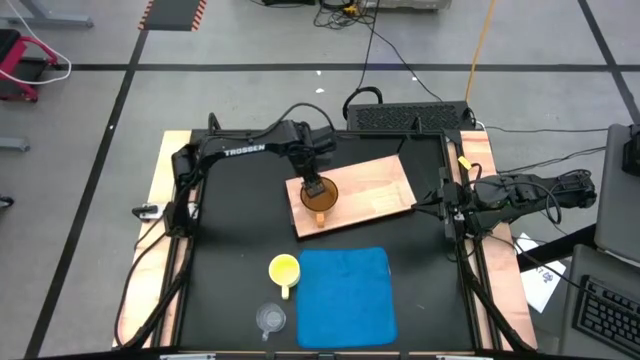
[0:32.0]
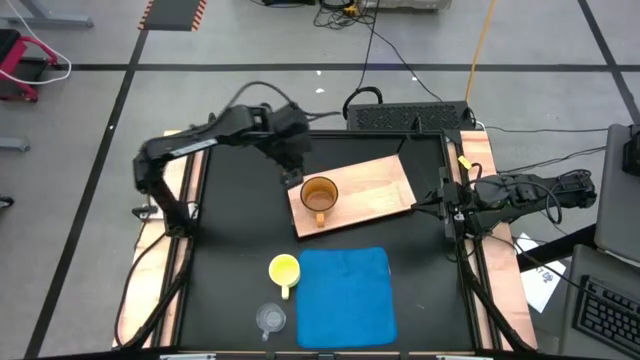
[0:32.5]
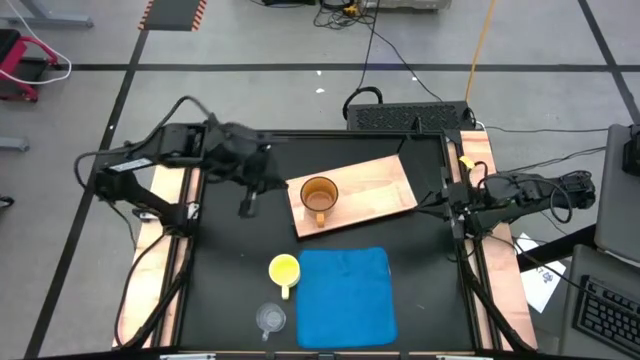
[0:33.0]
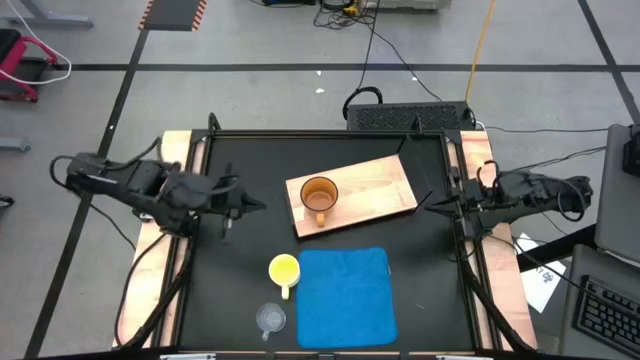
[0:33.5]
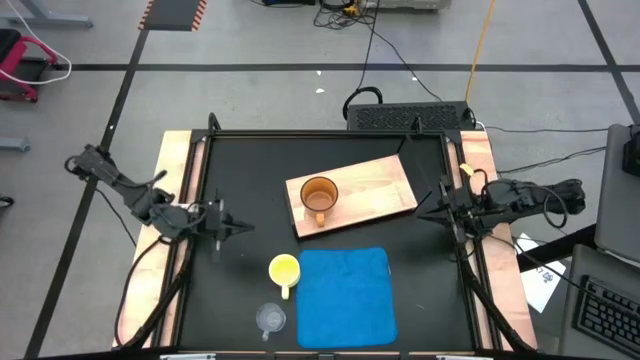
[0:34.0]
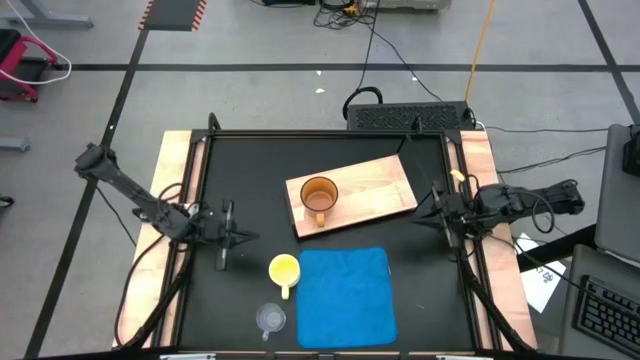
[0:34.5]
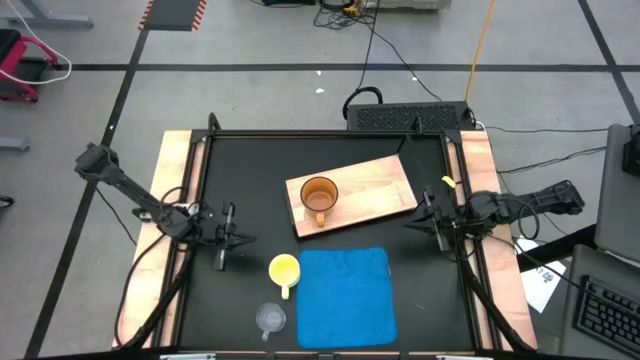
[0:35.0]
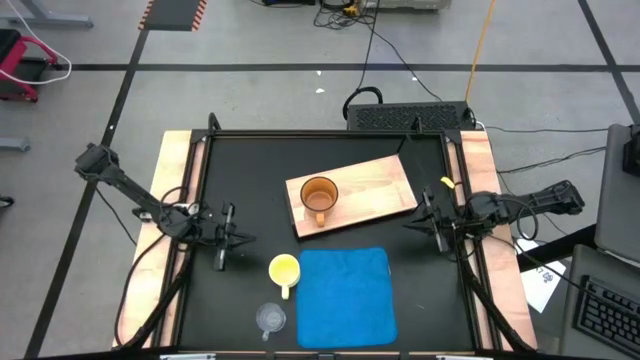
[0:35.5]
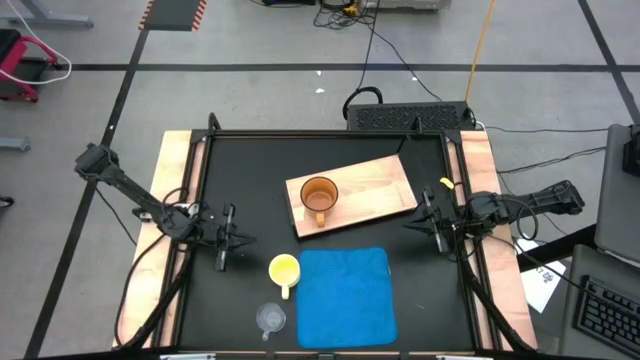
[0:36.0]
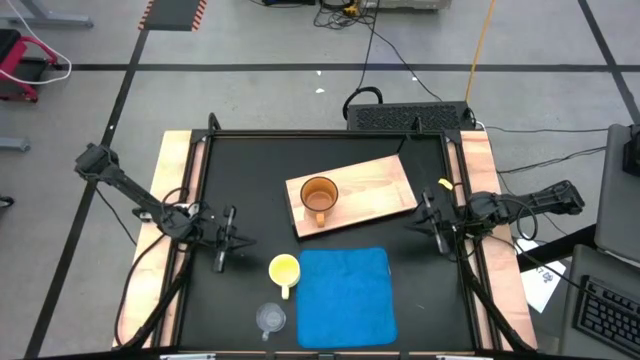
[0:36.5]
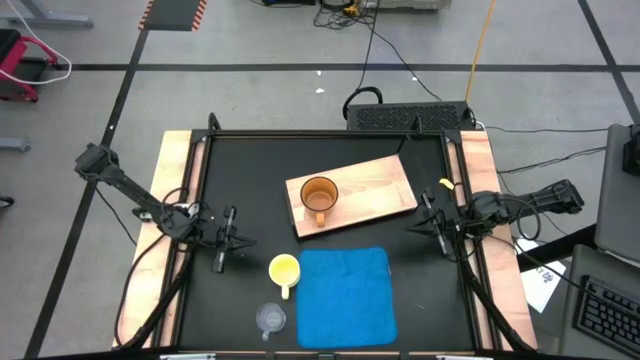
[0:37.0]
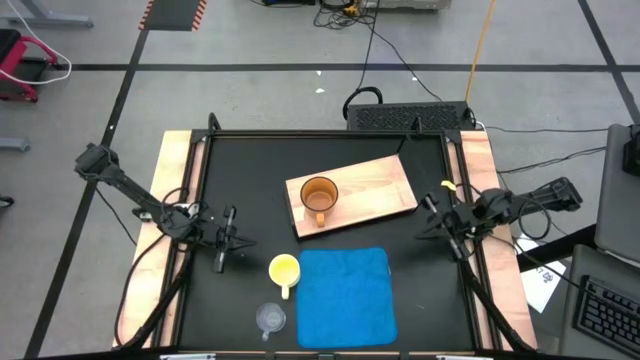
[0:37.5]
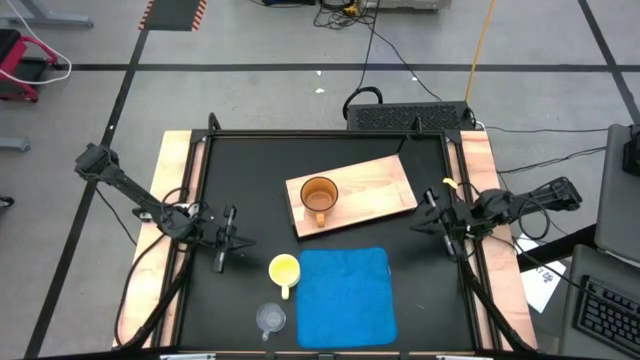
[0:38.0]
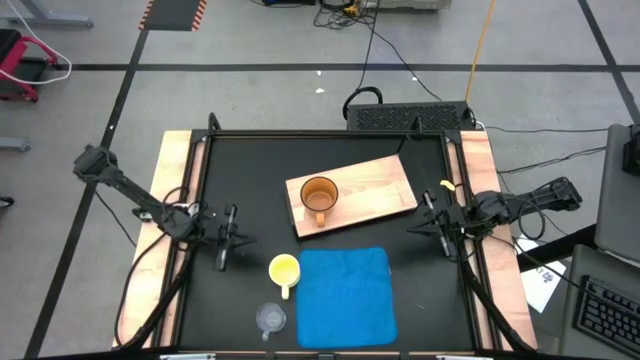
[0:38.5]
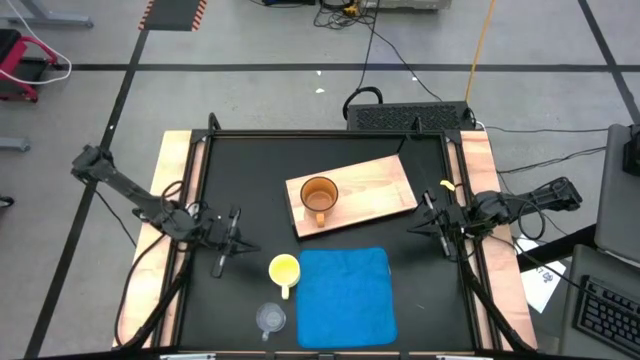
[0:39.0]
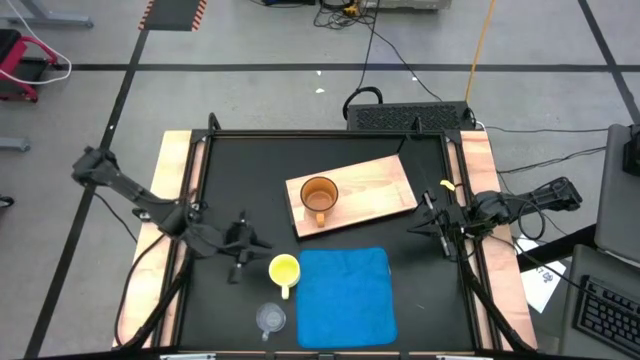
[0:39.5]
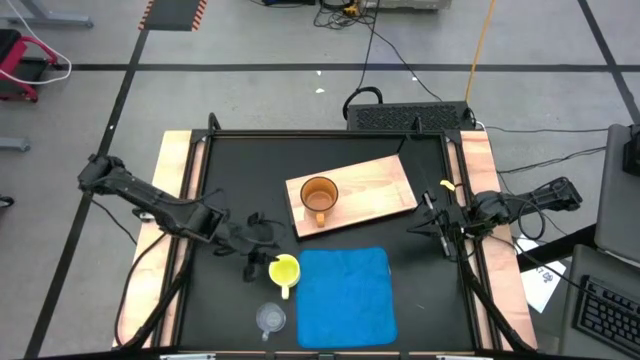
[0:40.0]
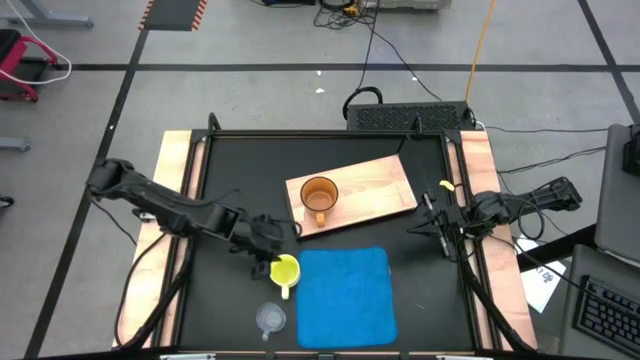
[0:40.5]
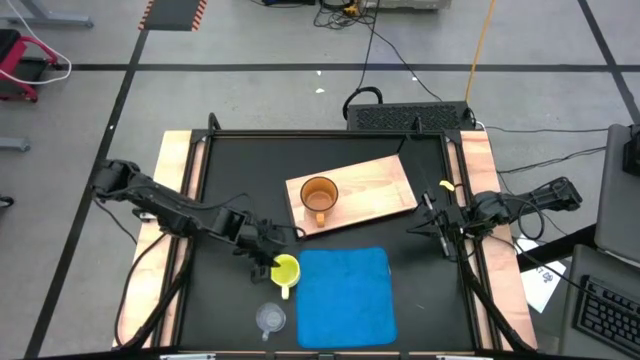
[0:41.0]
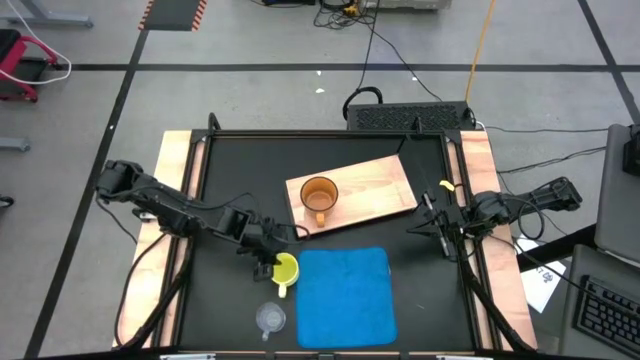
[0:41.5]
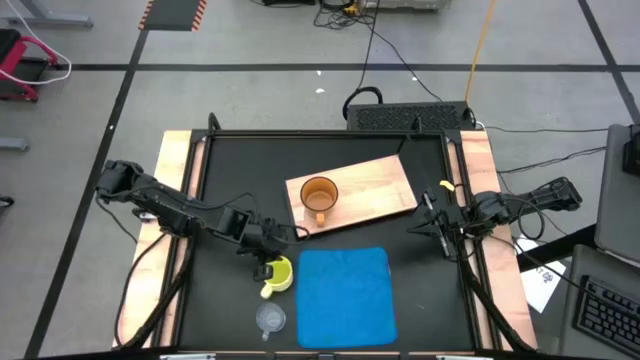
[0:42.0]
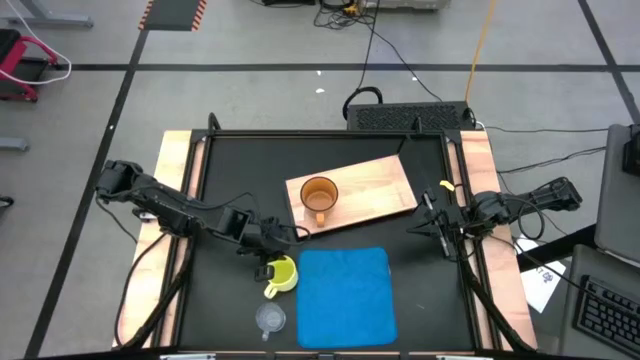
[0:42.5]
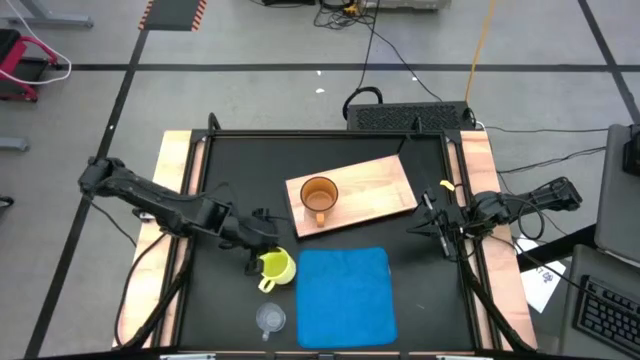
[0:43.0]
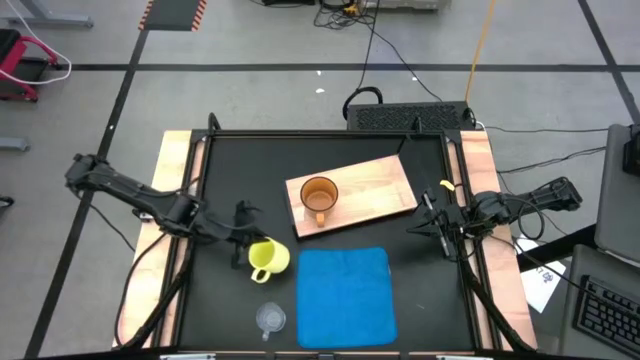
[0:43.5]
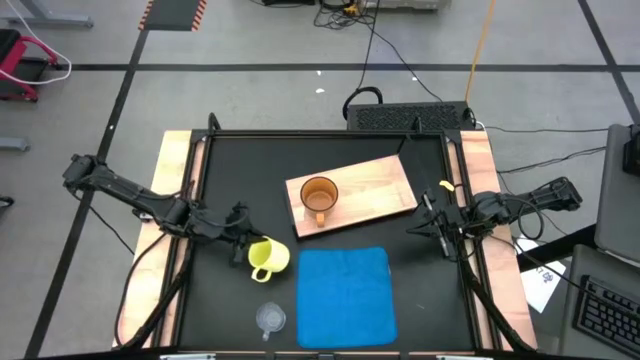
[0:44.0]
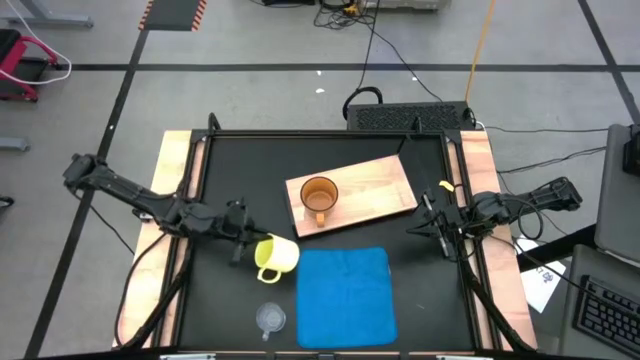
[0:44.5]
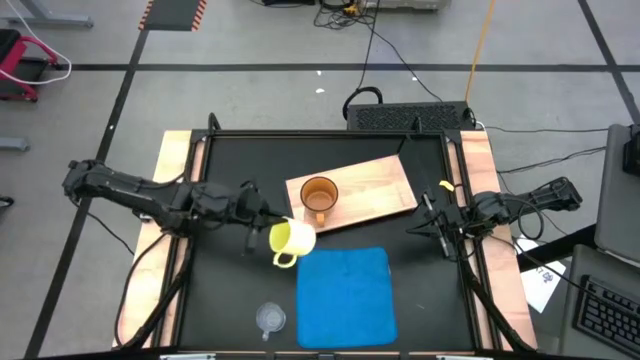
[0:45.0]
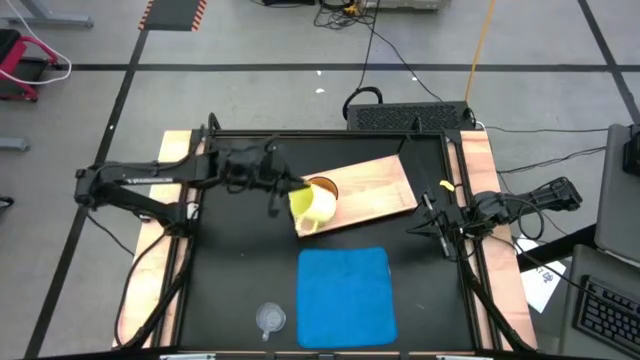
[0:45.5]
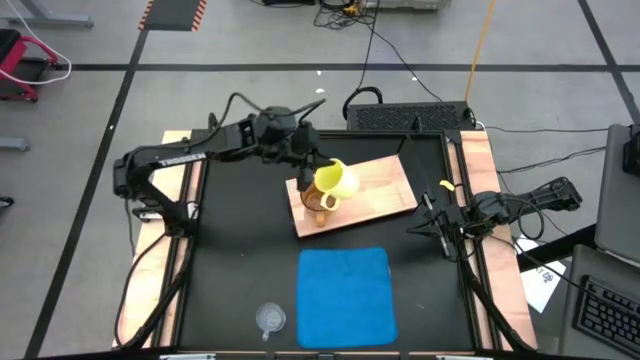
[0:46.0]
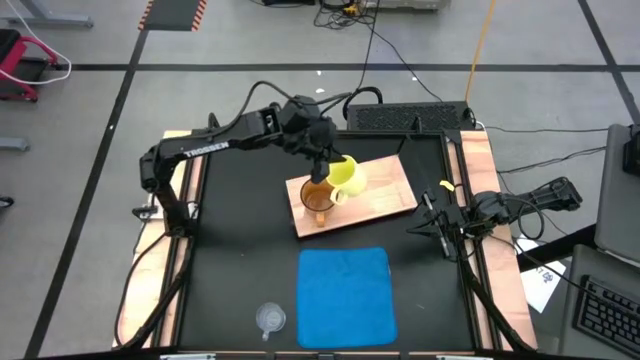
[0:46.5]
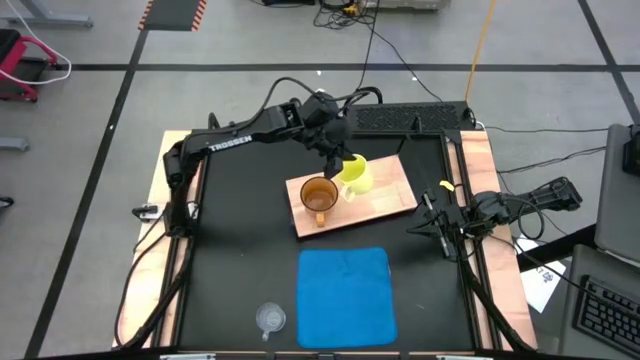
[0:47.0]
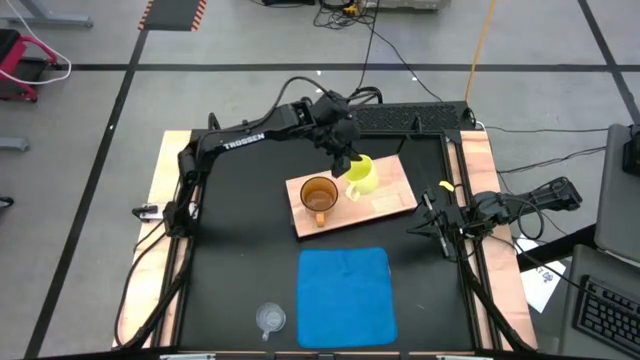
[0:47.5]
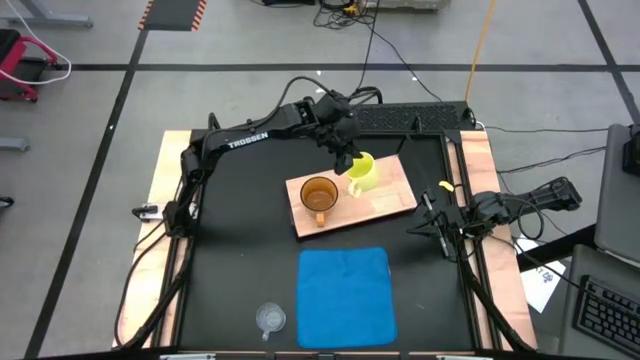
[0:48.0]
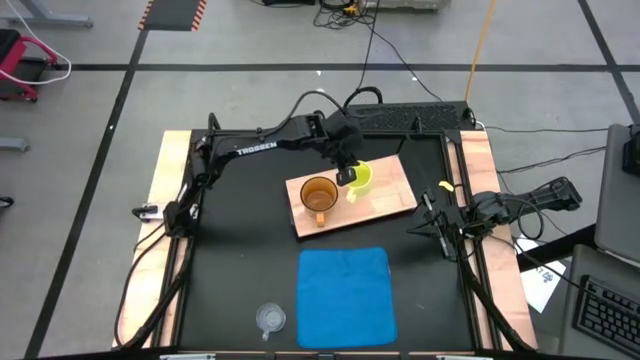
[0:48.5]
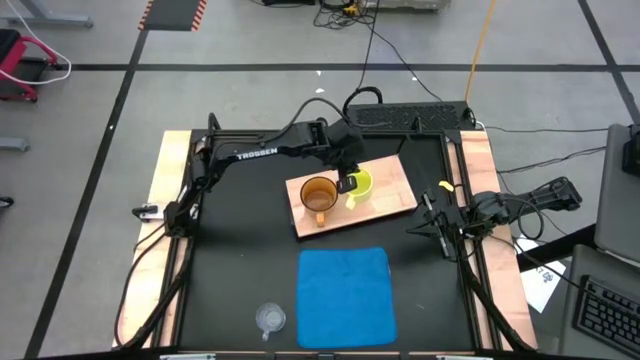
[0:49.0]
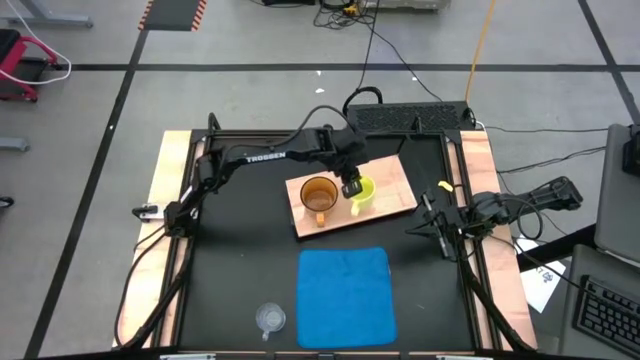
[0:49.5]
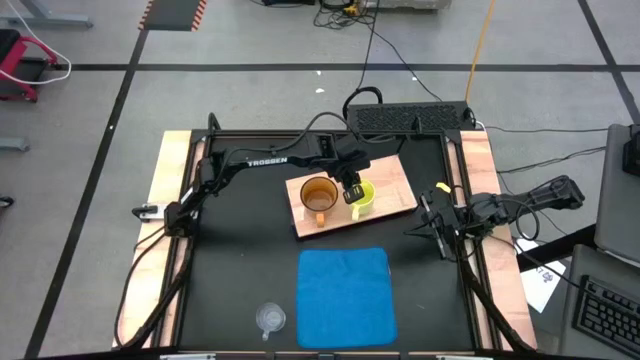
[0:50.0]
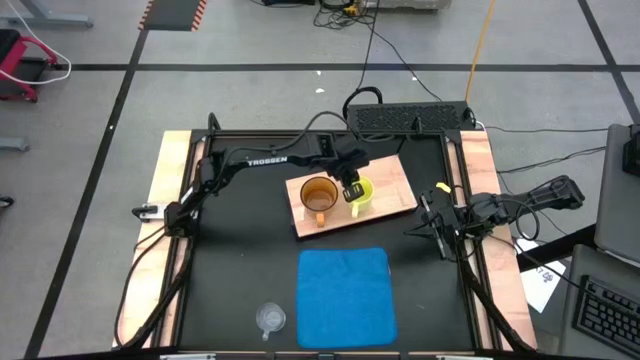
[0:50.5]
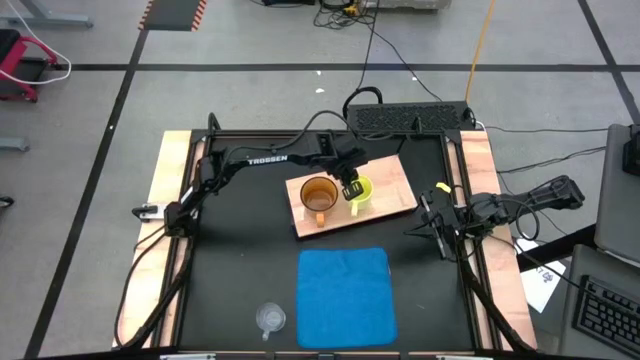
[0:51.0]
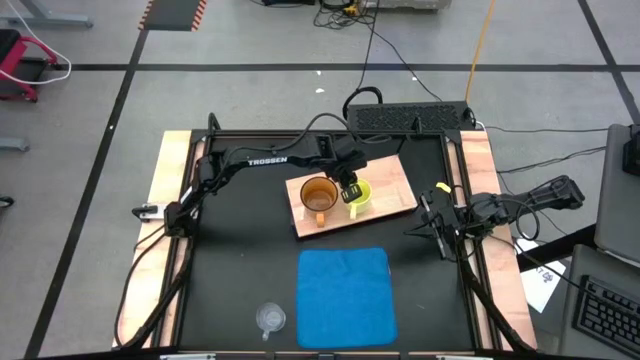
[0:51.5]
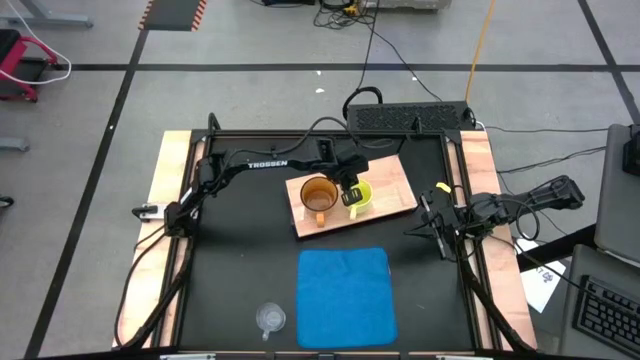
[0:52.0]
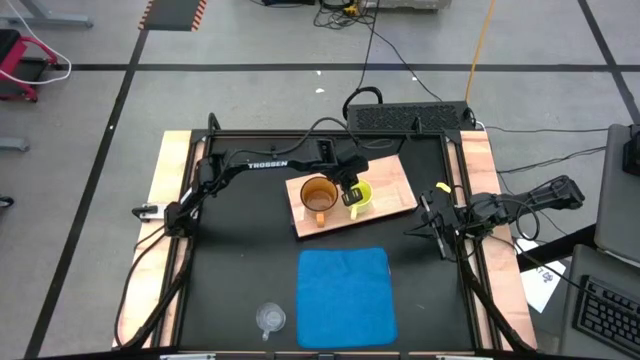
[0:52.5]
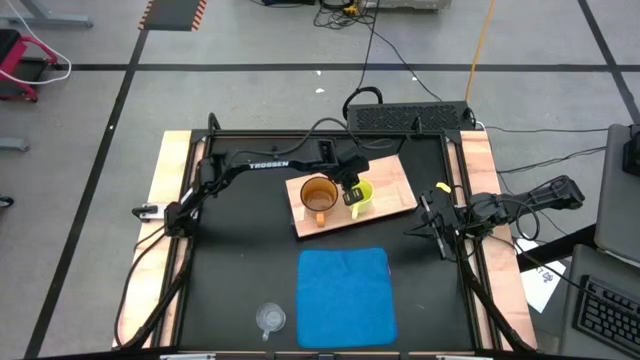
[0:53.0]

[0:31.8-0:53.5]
Task: Stack small to large cups/mugs on shelf
Put the yellow mug on the shelf
